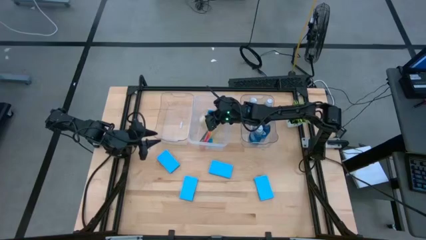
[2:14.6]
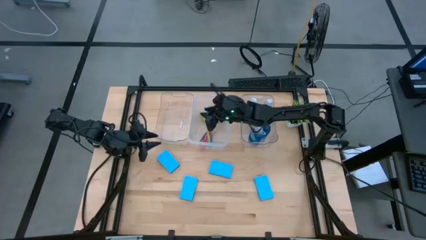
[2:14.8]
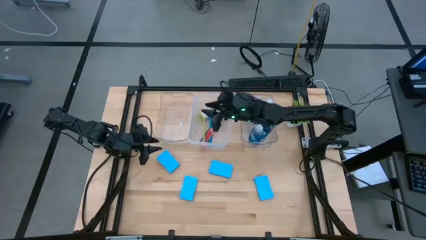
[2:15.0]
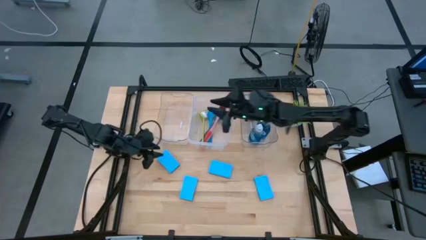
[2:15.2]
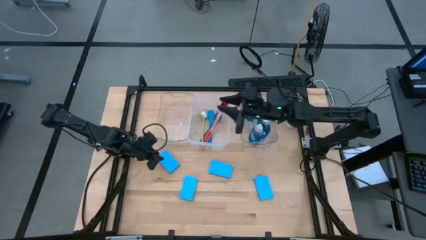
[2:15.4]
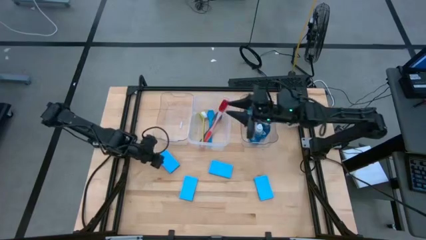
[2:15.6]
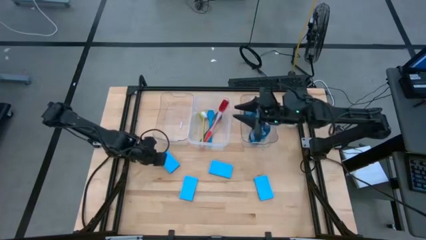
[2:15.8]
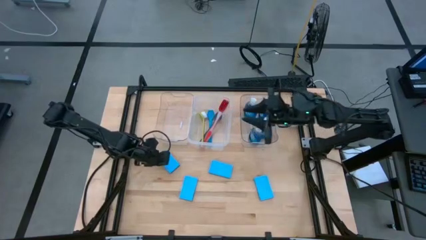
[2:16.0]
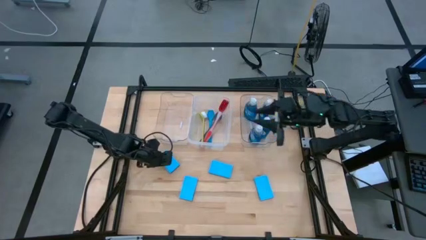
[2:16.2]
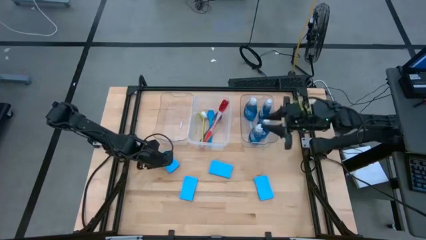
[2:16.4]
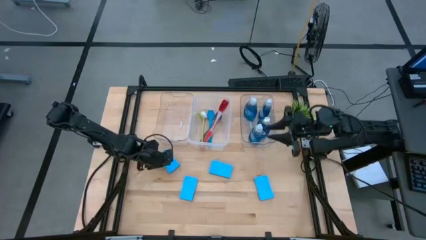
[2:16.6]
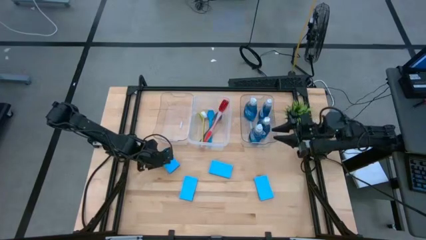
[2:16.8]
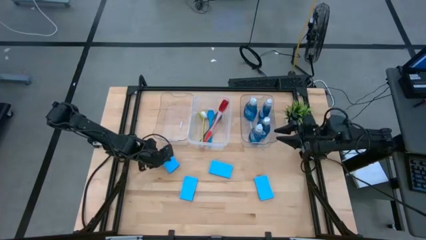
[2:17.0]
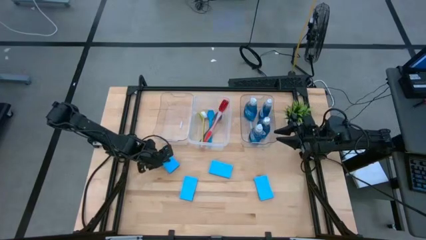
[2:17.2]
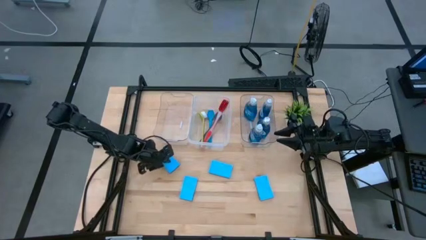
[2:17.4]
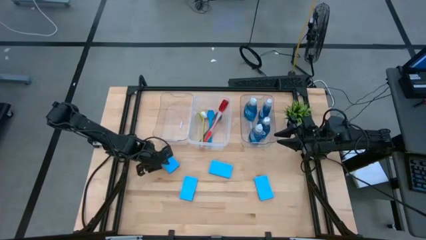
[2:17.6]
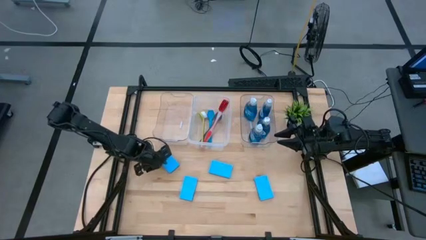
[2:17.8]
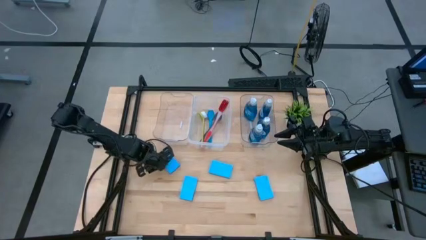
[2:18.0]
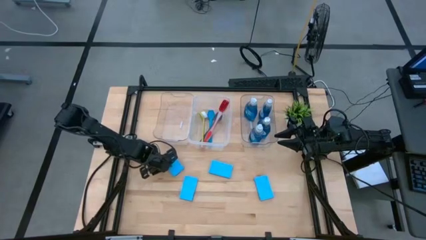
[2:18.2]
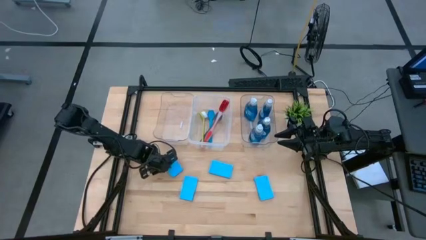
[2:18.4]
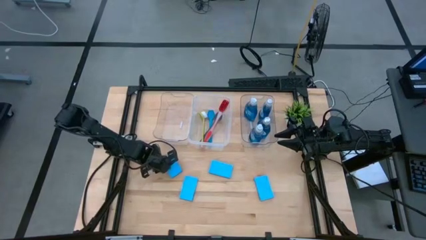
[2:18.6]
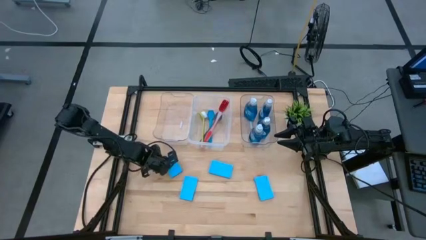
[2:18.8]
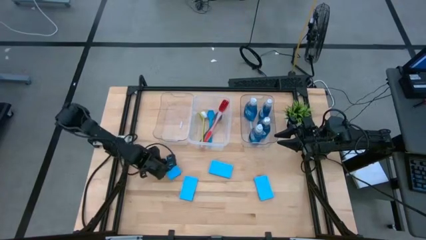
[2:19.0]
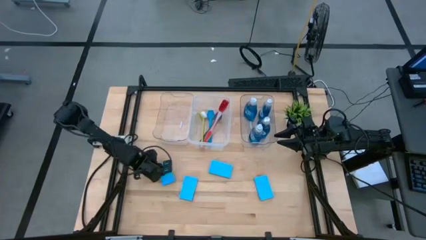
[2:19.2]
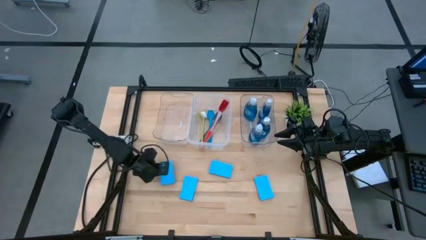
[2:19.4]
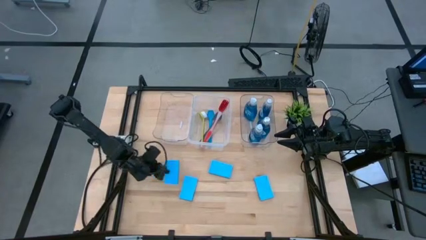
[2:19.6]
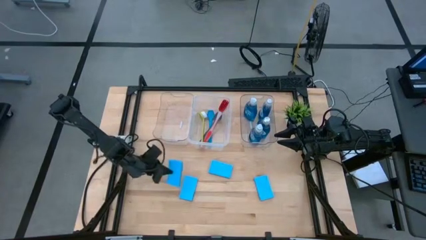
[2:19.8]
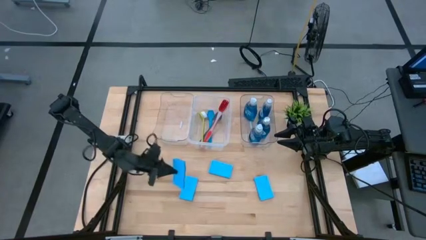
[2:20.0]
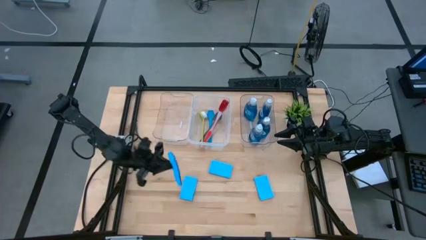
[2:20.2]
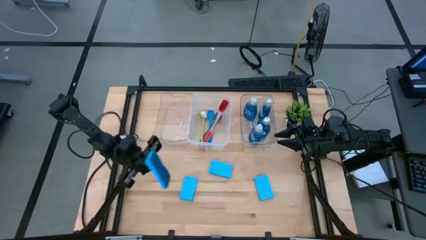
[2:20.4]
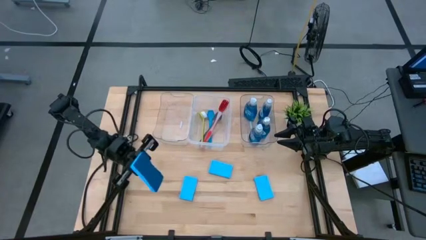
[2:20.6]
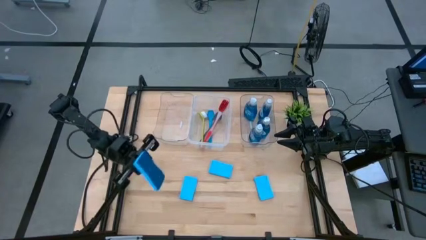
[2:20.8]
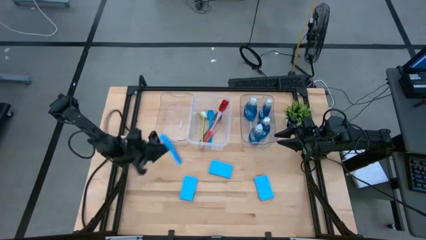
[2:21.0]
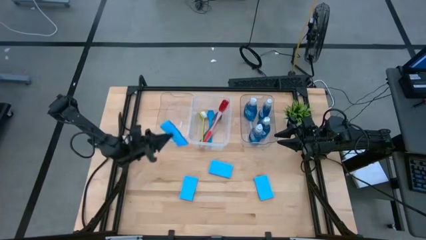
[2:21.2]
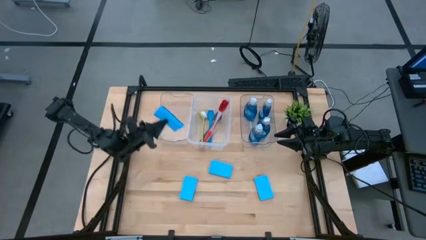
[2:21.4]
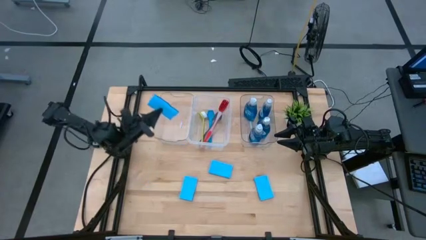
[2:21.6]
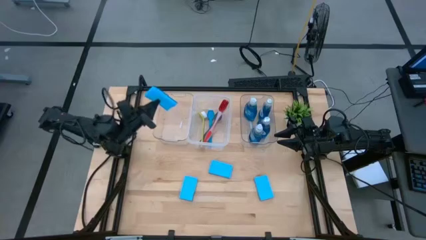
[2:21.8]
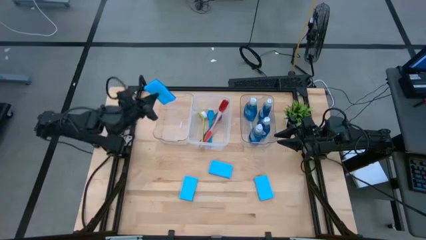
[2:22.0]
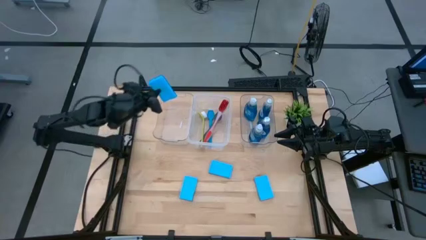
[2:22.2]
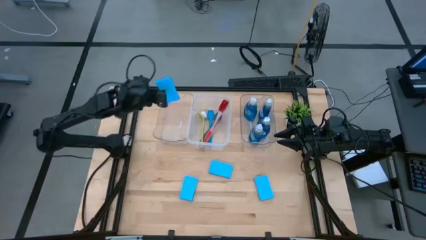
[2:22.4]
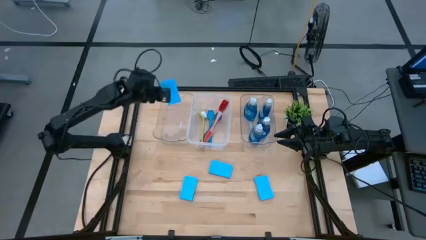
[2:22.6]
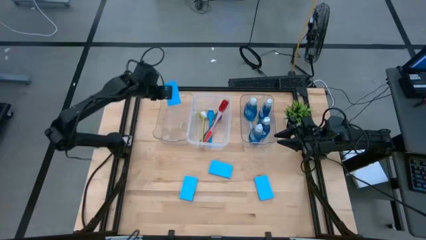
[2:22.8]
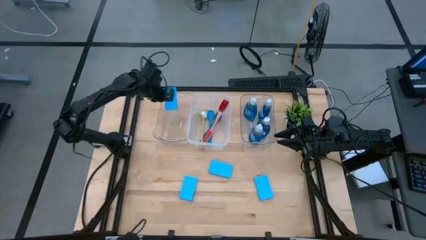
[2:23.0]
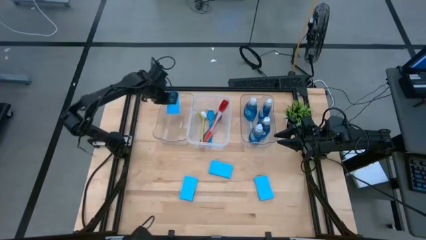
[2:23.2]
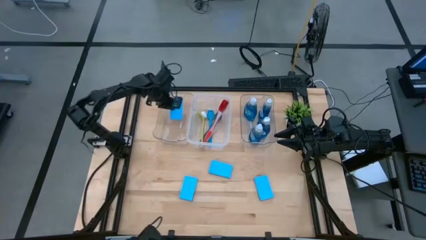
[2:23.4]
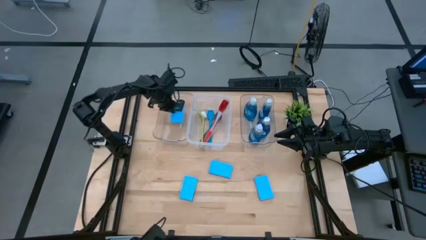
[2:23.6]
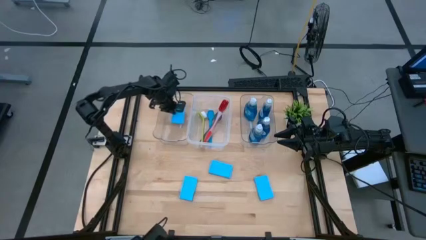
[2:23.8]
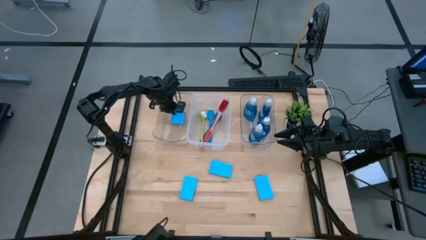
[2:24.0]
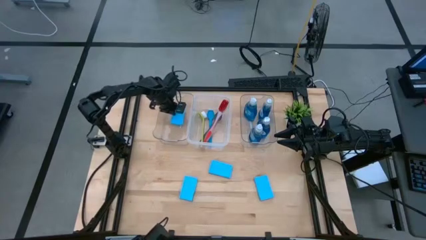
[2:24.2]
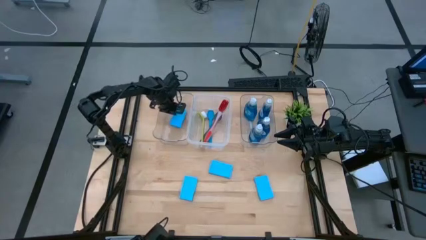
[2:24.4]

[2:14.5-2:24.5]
Task: Pick & Place Kitchen Sink Supplies
Put the sponge into the left transparent bin
